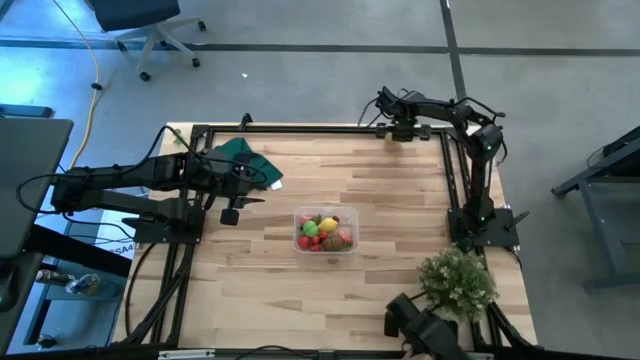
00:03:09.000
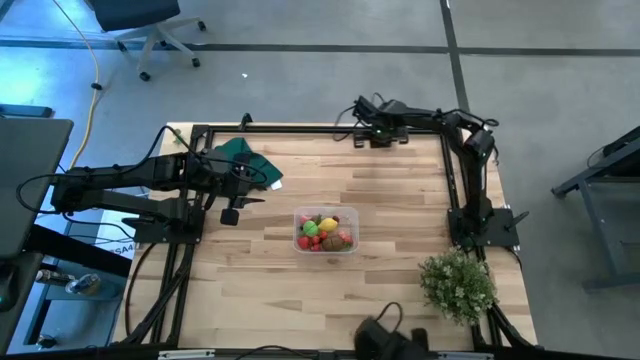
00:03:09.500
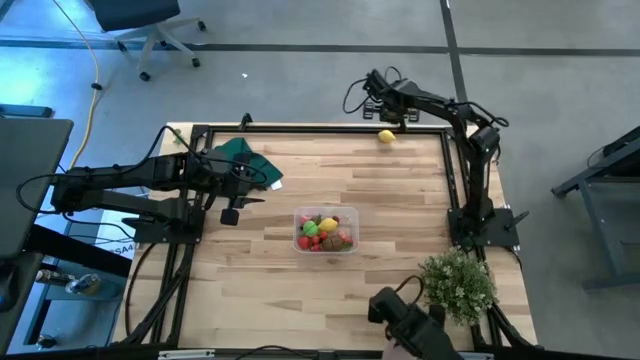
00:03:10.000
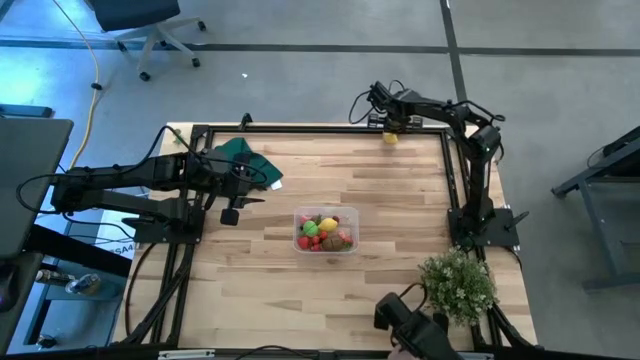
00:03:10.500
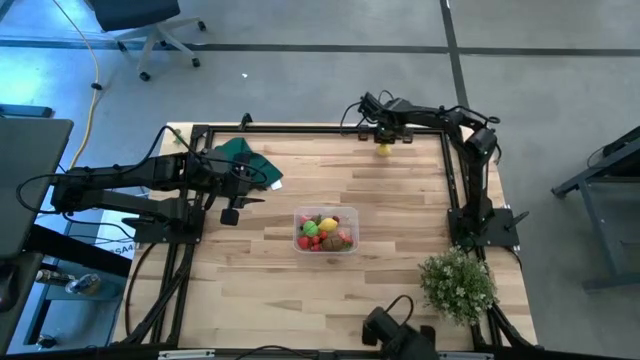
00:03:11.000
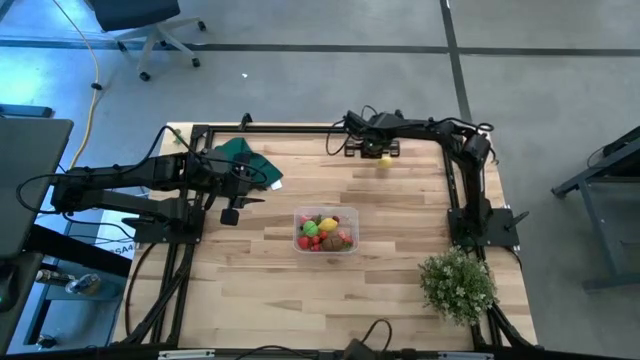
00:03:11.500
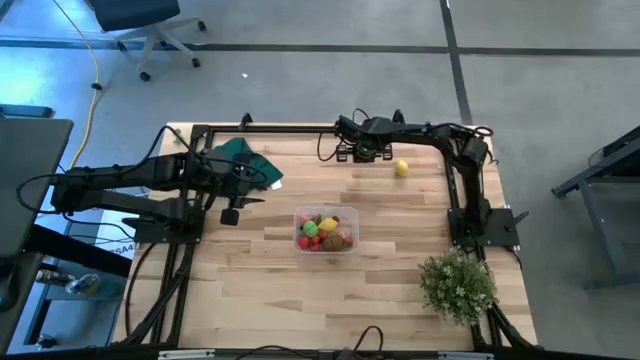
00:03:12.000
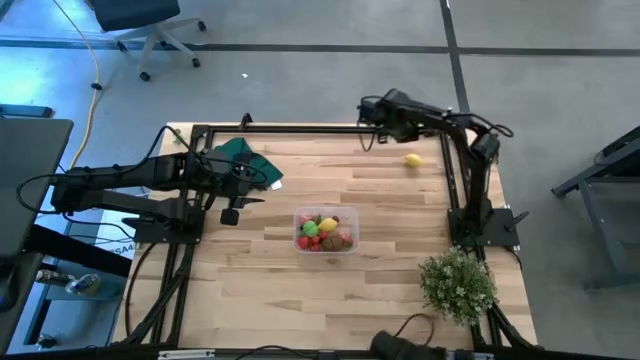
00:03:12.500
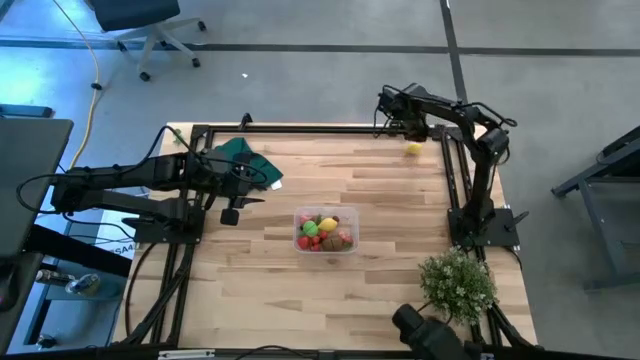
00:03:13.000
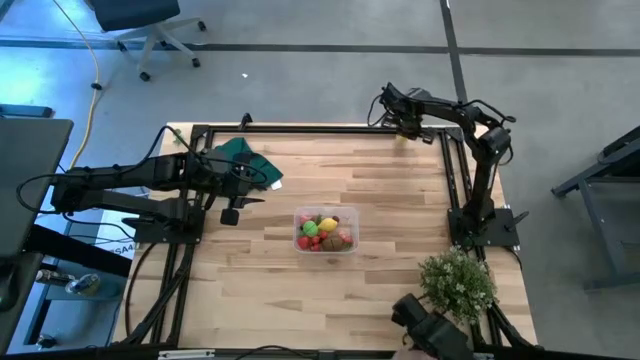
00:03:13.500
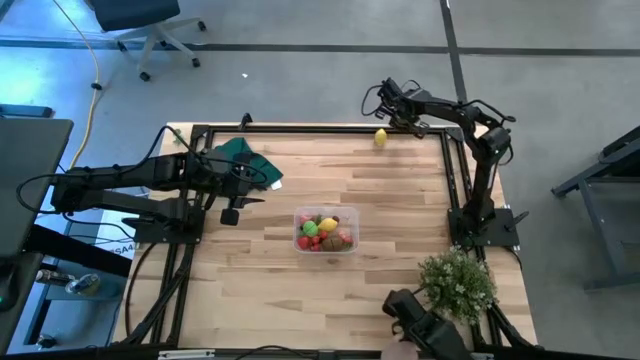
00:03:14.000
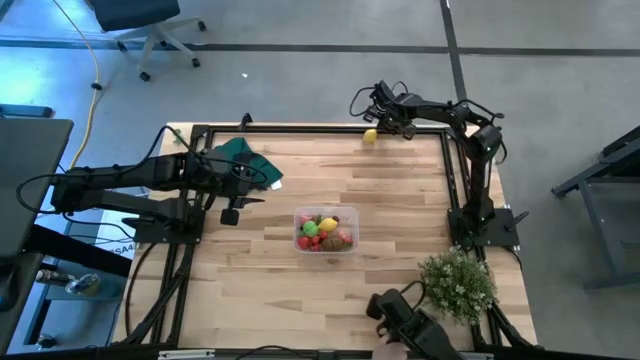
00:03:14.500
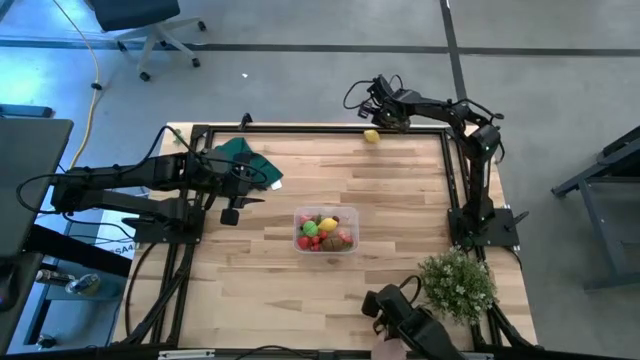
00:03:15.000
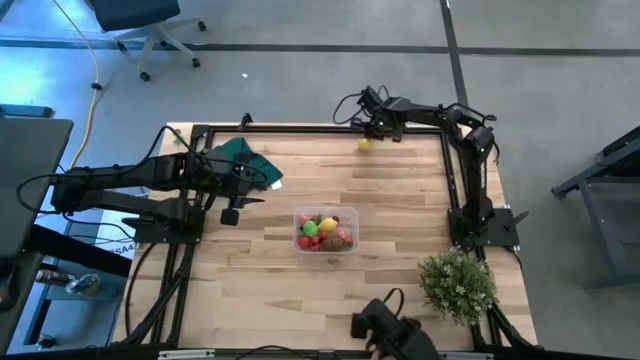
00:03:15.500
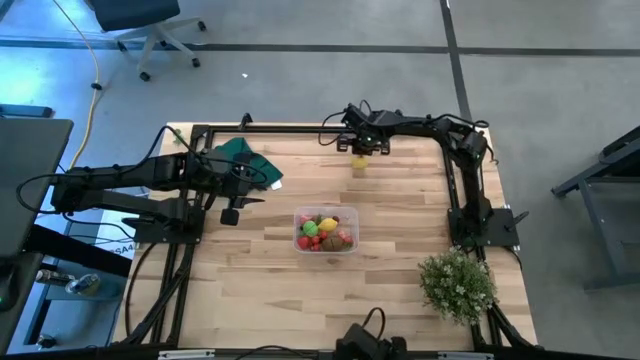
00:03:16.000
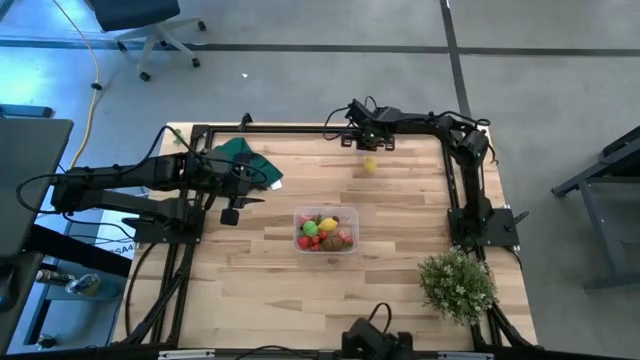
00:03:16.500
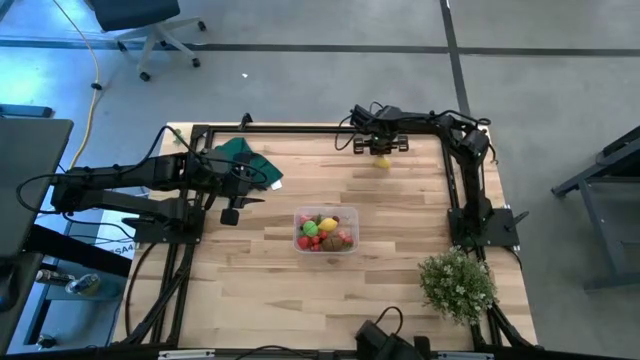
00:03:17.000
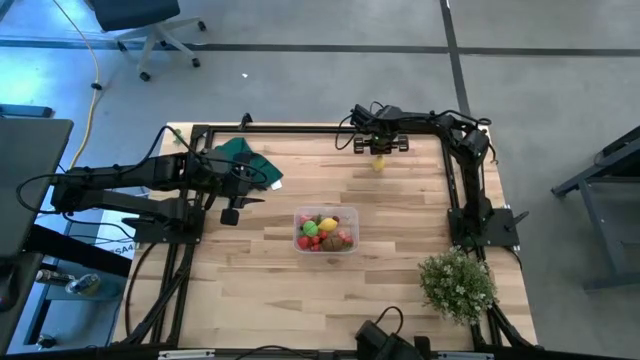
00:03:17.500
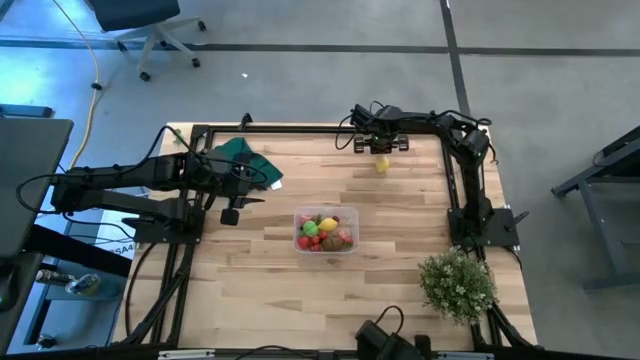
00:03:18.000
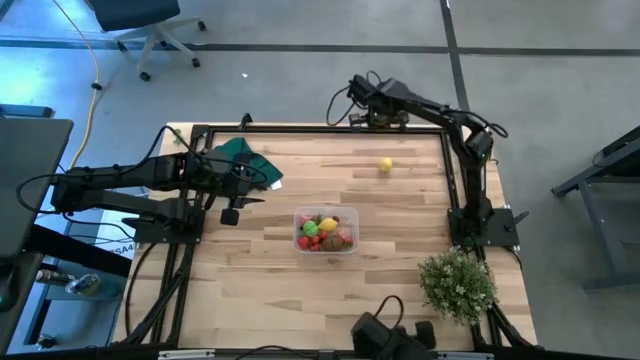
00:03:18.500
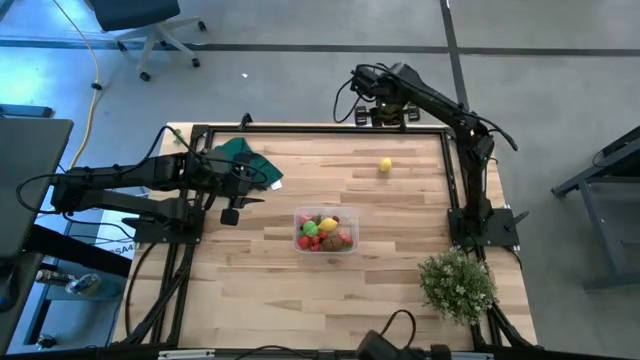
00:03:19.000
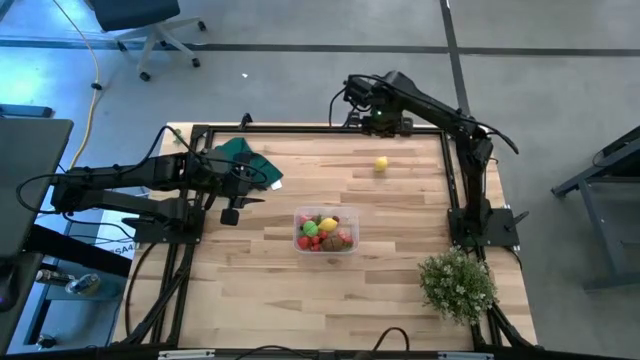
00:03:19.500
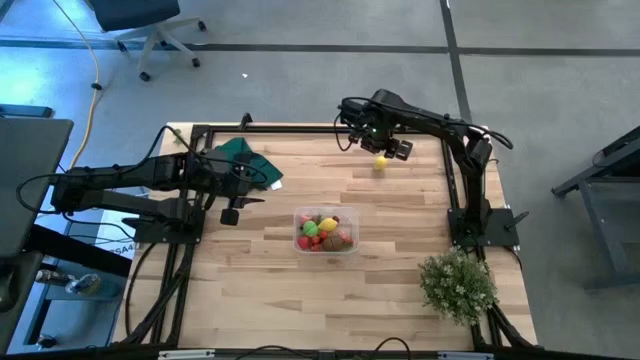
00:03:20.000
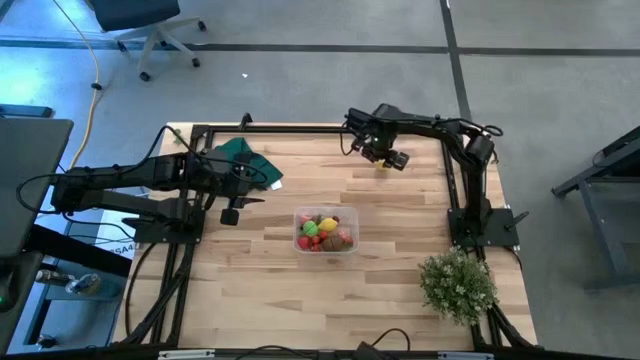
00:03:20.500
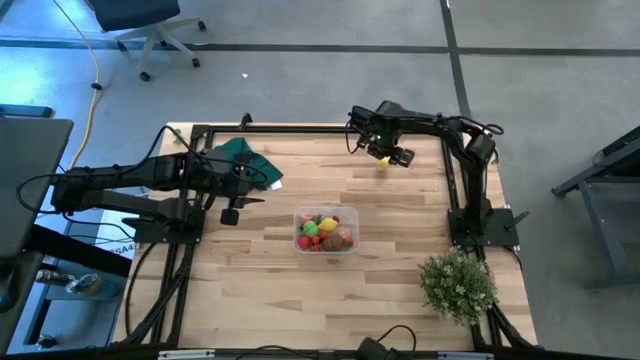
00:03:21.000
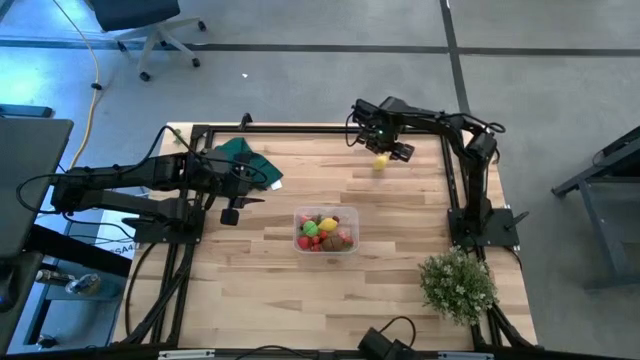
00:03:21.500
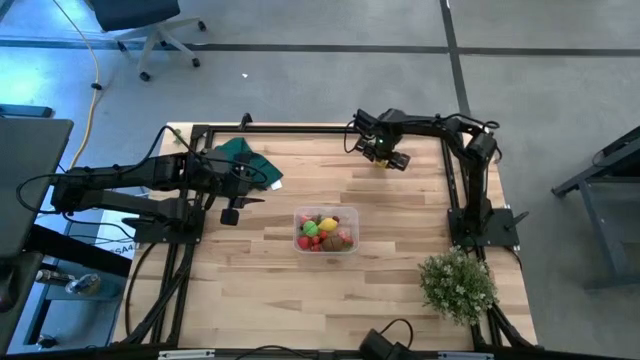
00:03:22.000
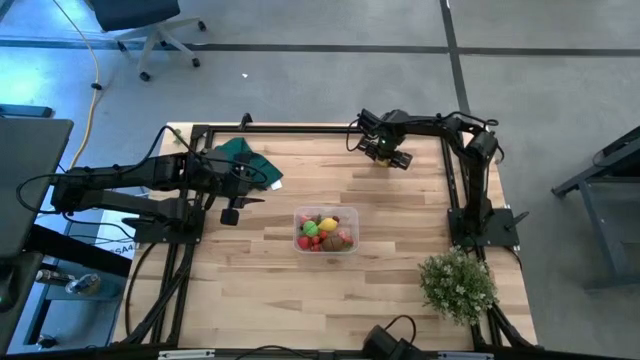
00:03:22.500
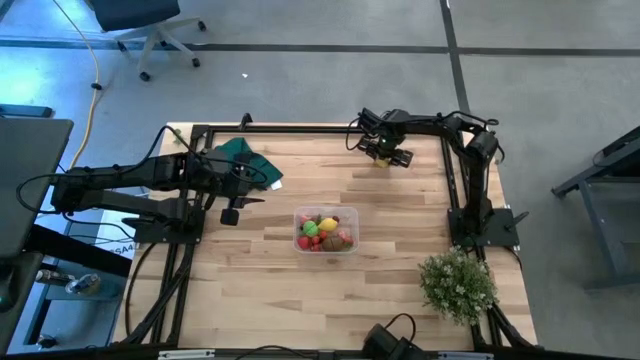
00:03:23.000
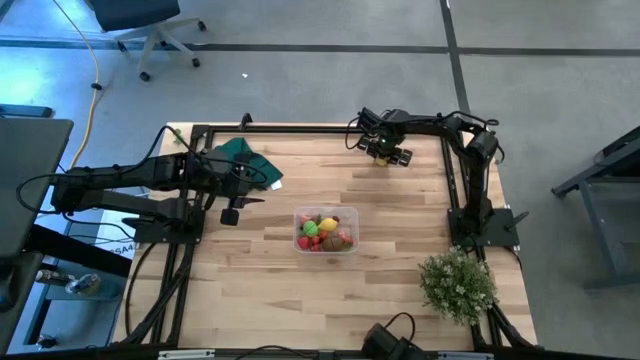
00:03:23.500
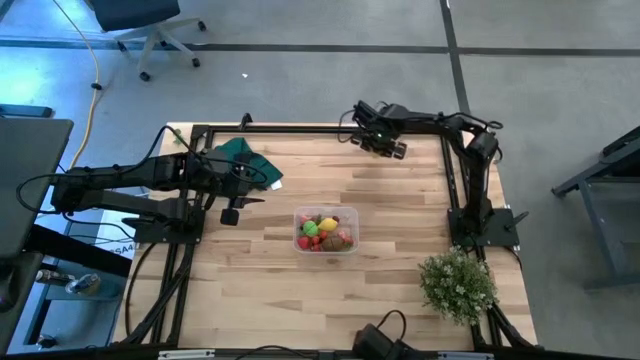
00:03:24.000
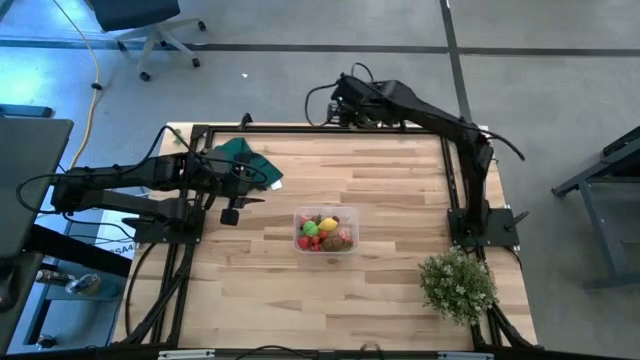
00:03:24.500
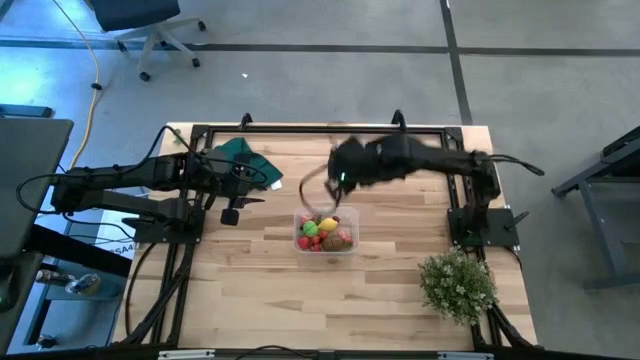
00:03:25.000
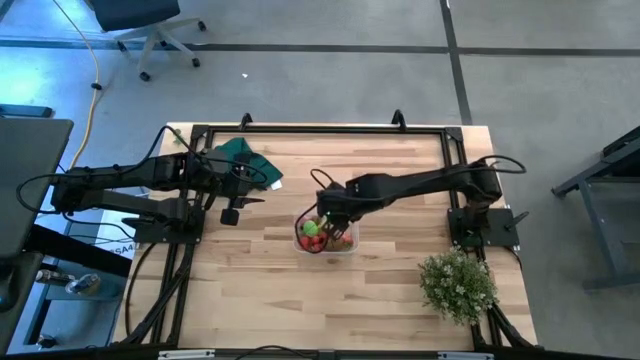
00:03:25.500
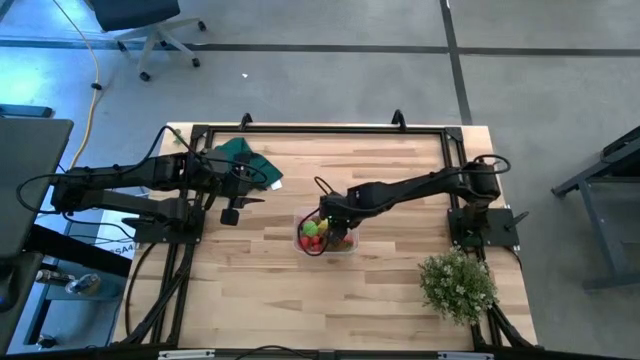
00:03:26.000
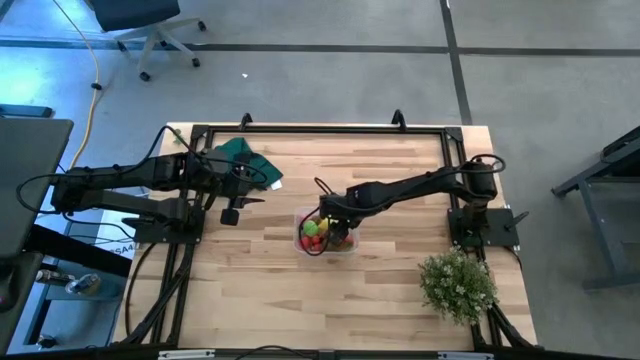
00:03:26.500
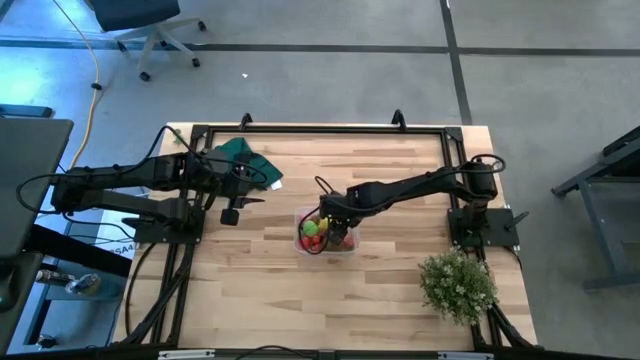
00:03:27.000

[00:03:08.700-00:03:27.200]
Task: Pick and placing Produce into tupperware
Put the yellow lemon into the transparent bin

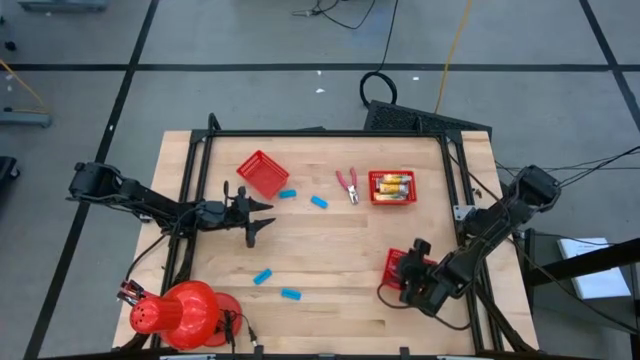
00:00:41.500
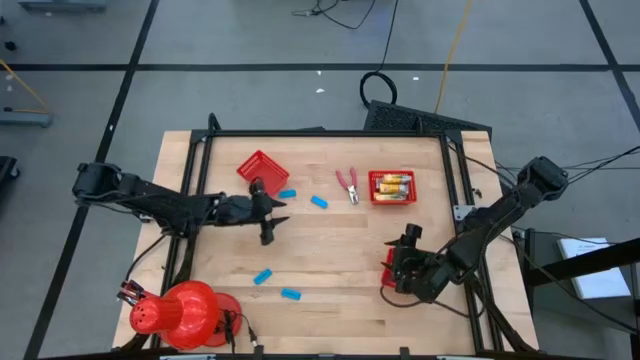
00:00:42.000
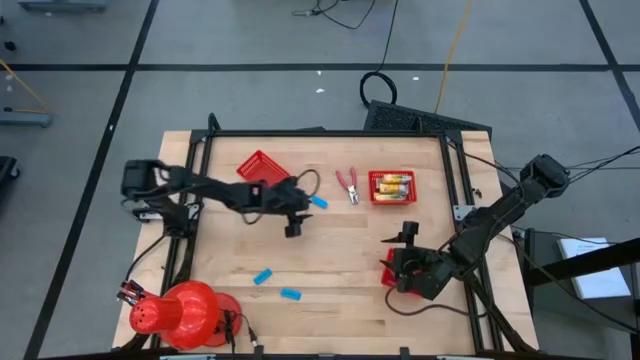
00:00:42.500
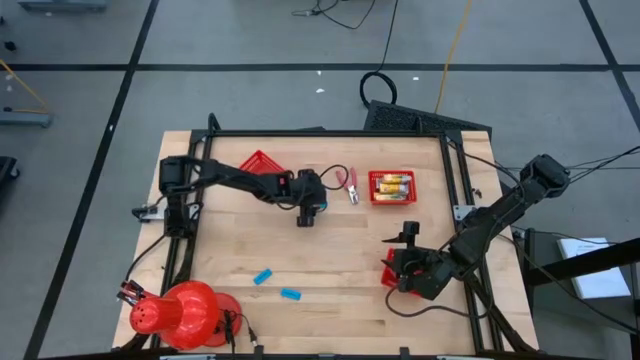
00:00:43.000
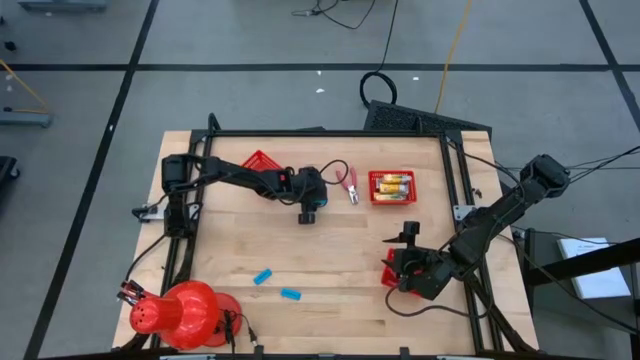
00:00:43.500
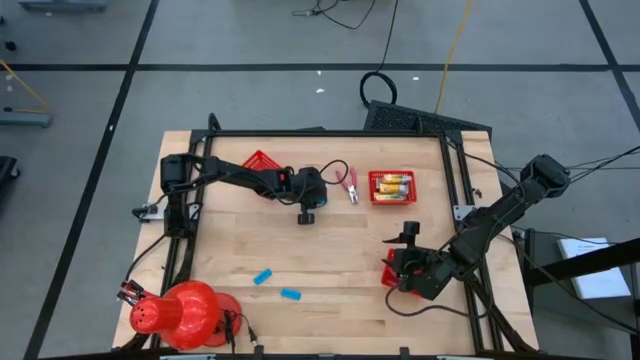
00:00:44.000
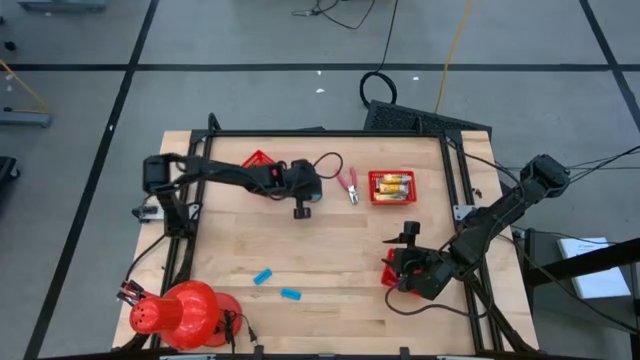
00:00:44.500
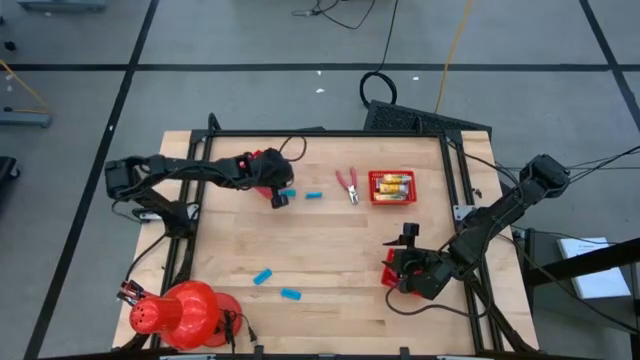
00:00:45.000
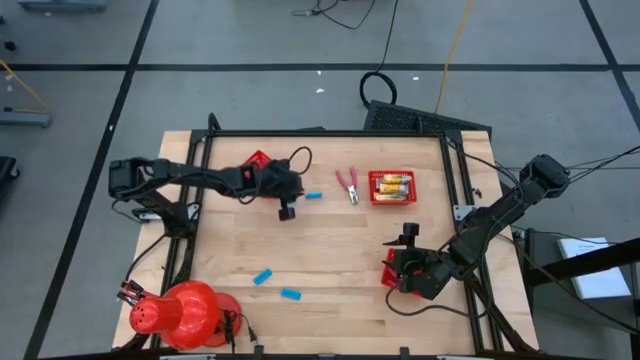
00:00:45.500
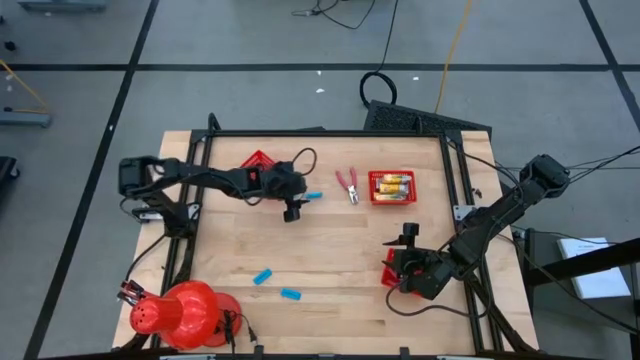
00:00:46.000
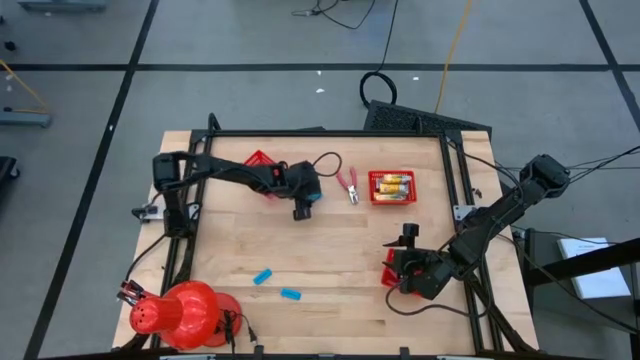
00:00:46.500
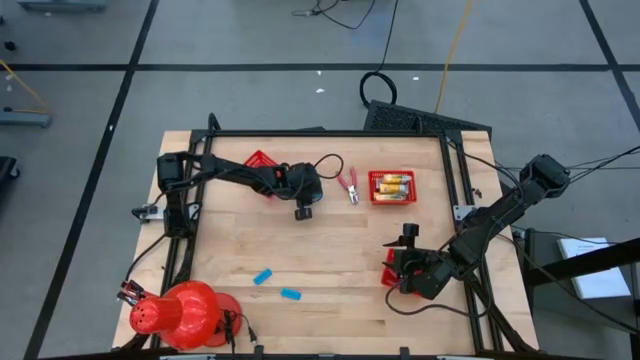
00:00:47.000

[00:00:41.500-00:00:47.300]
Task: Pick & Place School Supplies
Put the blue eraser into the top left red bin
